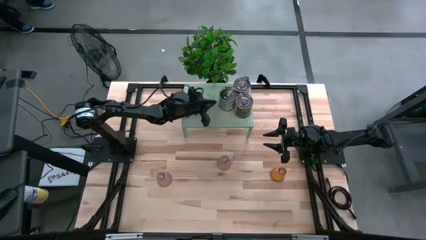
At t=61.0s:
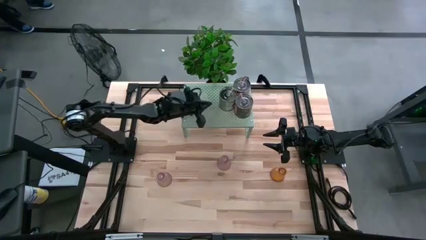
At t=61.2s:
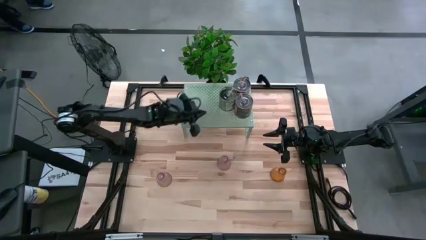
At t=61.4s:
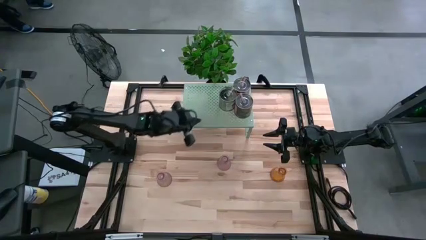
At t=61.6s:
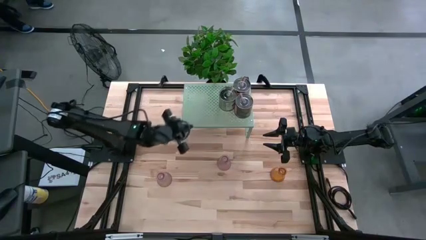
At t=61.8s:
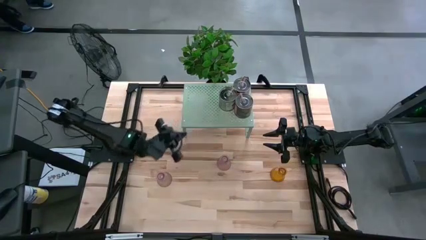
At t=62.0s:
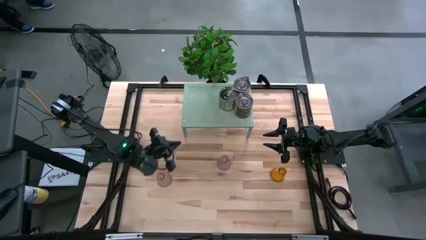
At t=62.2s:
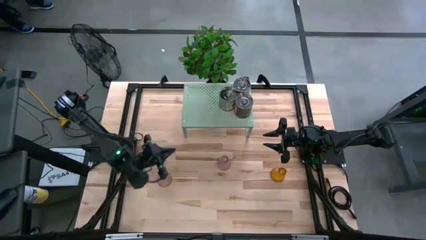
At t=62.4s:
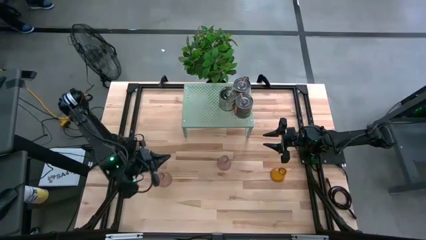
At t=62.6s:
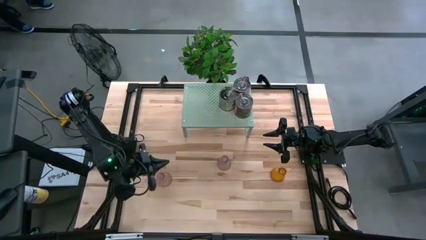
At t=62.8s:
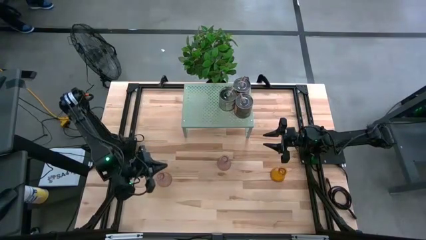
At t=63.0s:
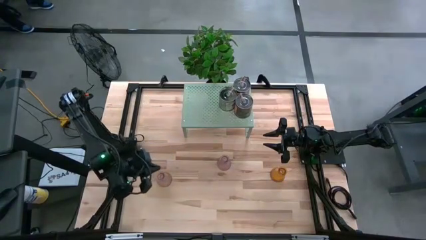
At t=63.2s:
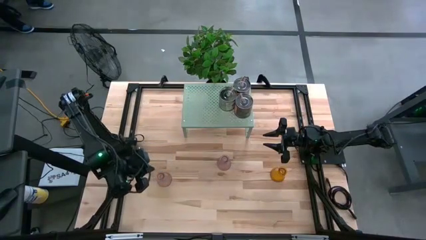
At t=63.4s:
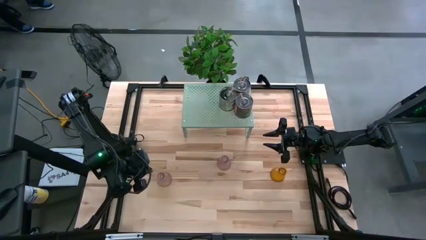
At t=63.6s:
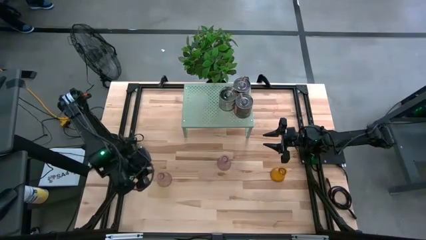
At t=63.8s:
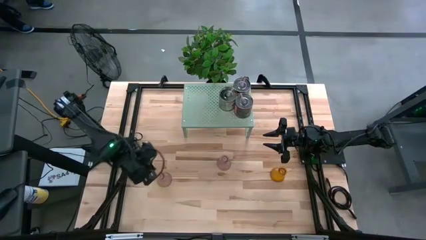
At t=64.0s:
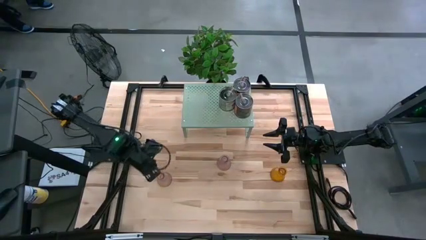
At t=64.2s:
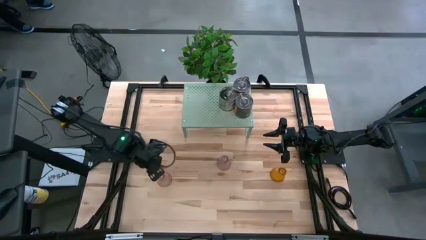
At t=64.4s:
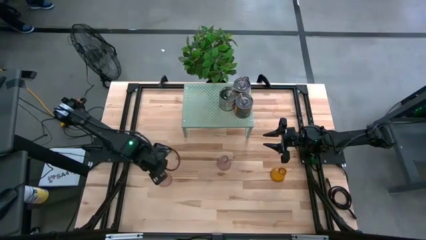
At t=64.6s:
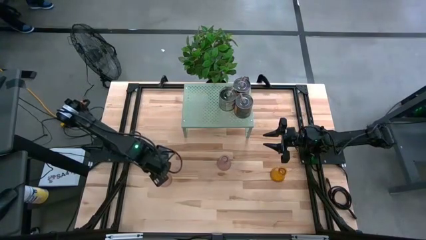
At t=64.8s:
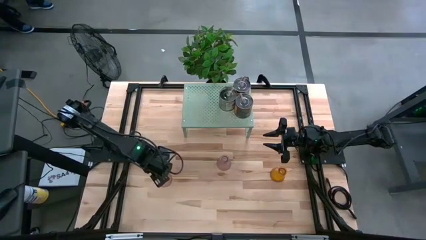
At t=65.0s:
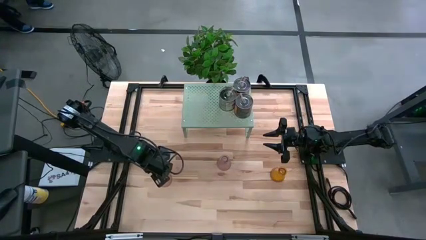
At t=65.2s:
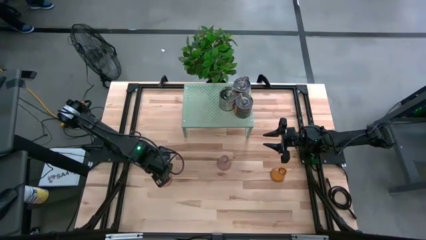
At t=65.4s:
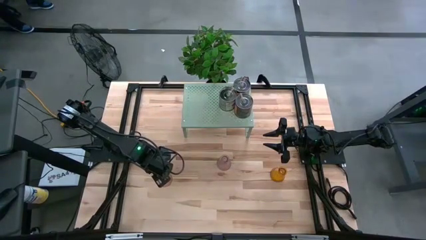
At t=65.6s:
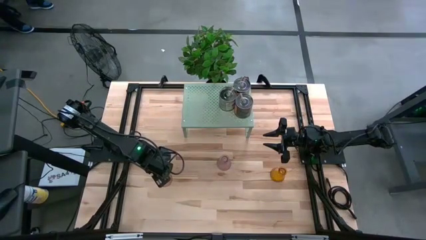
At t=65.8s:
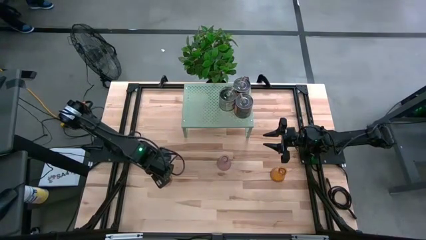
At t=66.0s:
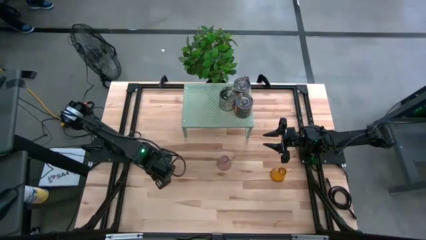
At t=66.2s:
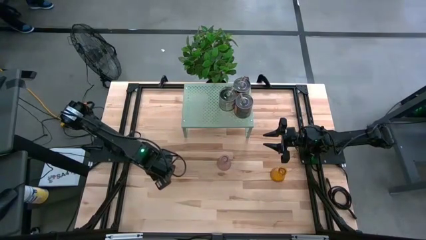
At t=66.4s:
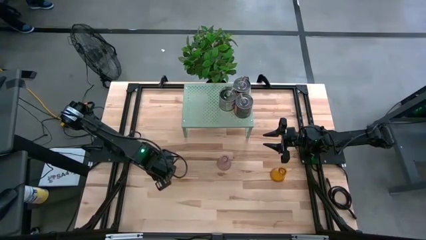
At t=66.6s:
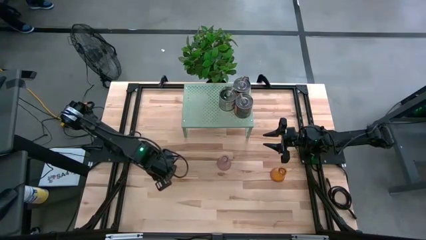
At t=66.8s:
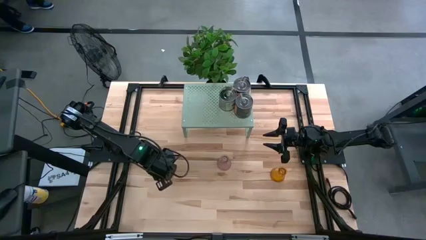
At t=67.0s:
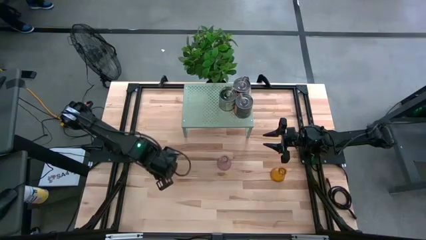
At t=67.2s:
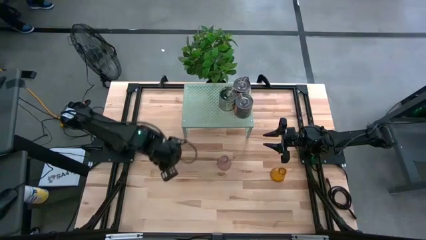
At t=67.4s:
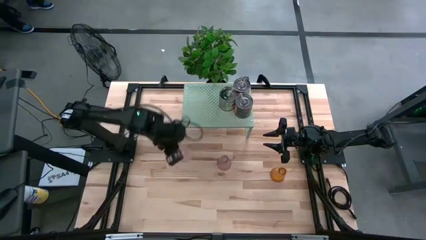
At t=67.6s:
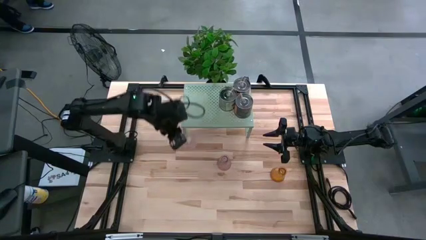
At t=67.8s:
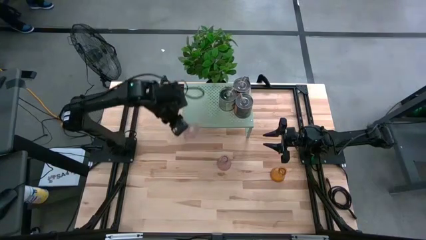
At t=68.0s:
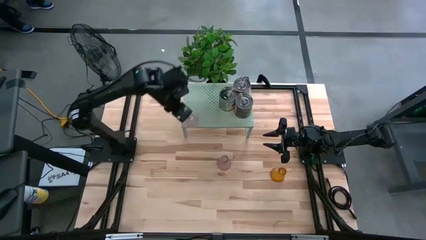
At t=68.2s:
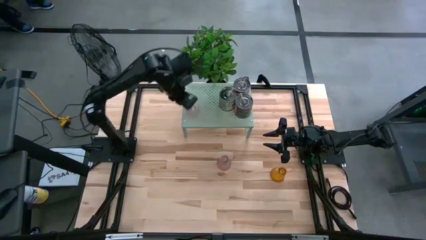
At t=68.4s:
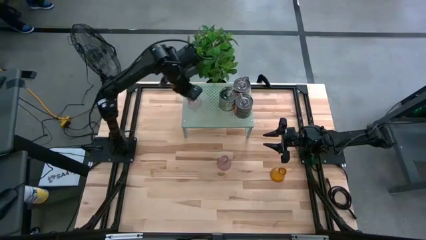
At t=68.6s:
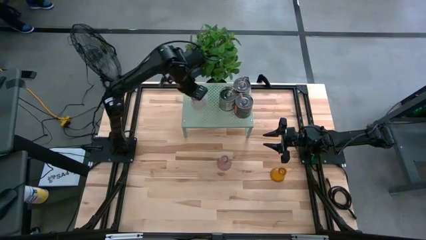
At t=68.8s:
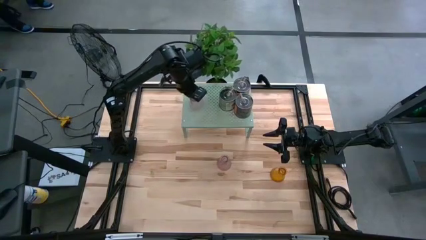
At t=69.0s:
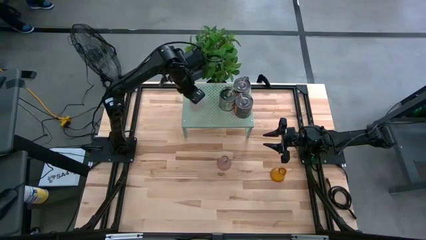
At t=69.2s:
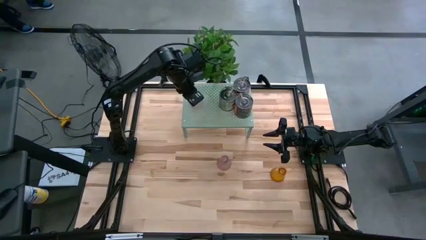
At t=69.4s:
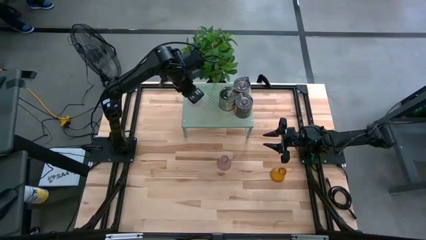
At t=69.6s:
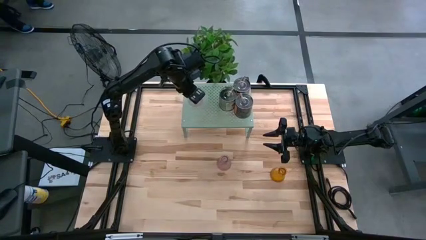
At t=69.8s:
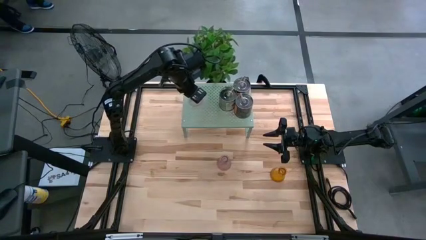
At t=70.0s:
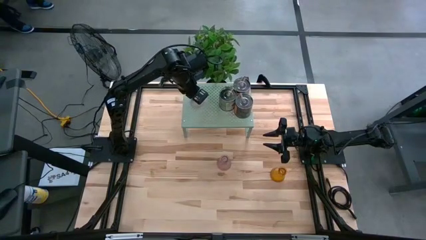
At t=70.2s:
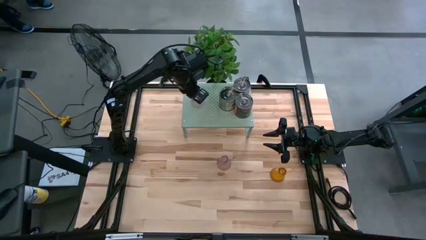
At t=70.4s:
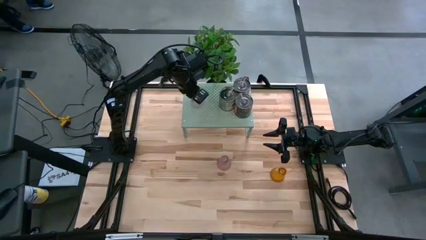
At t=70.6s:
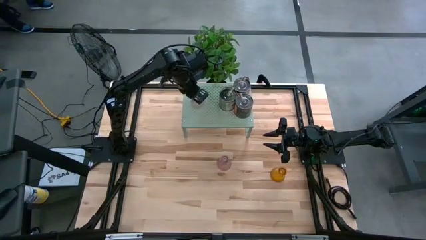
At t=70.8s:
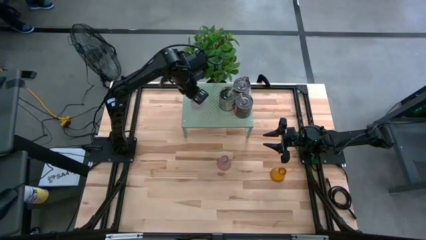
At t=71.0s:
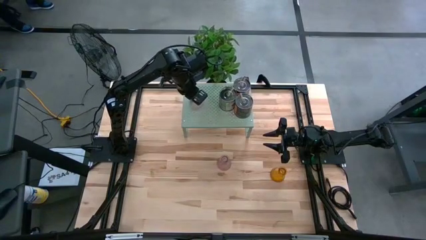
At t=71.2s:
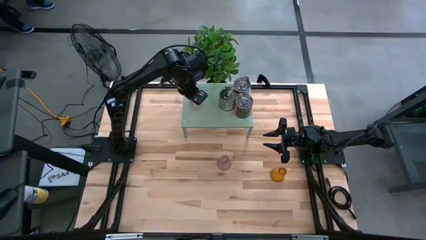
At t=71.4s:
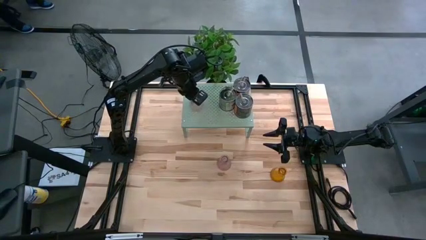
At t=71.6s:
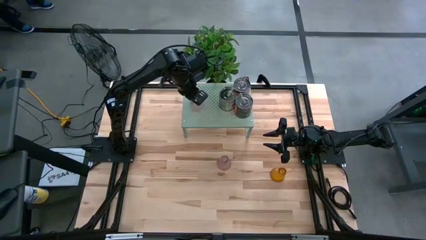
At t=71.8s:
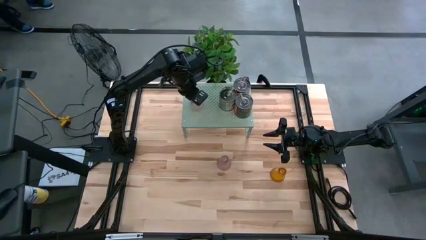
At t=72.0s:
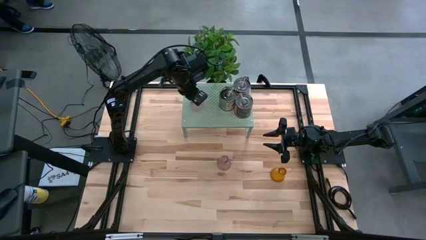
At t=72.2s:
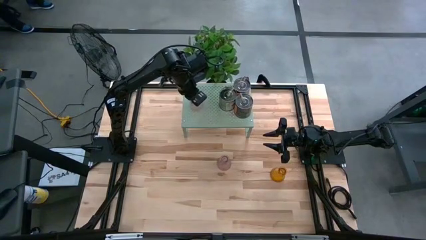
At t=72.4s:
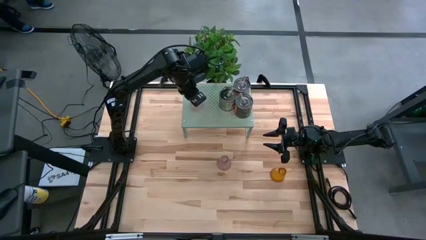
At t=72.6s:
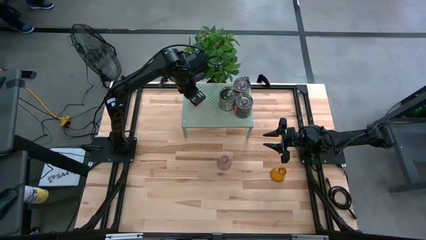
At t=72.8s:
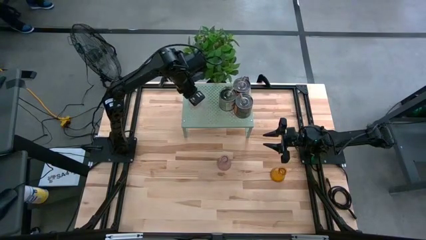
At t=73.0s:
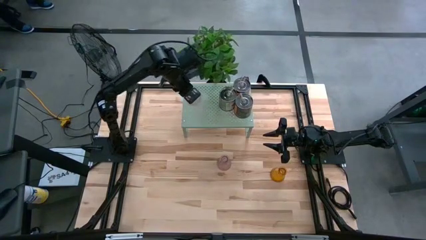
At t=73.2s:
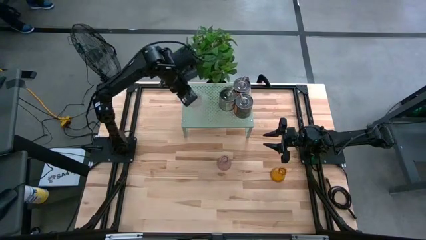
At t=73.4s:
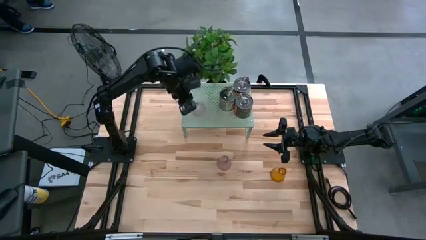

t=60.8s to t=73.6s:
Task: Pick & Place candle stick holders
Put the left pink glass candle holder on the shelf

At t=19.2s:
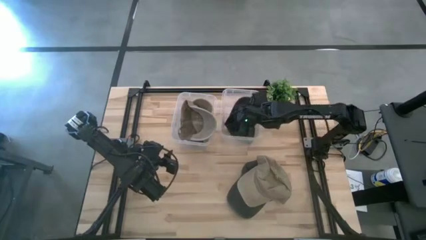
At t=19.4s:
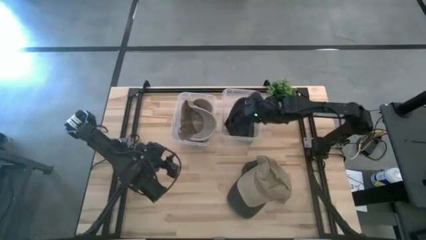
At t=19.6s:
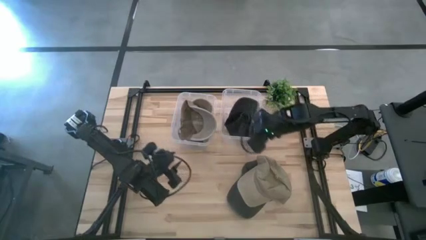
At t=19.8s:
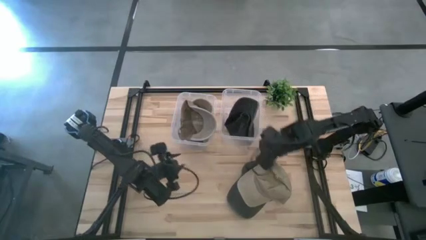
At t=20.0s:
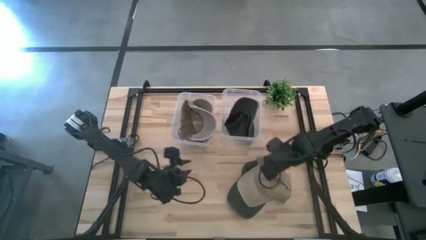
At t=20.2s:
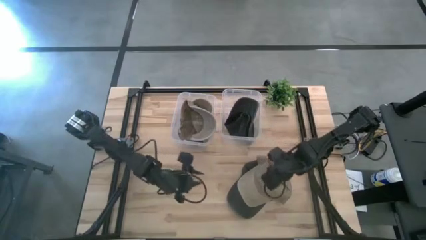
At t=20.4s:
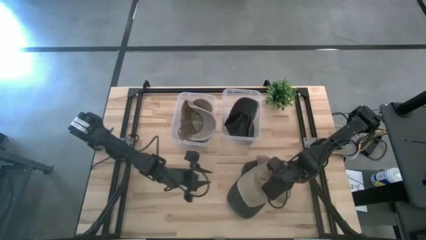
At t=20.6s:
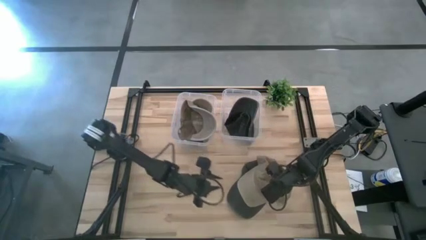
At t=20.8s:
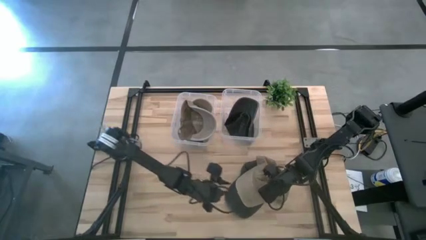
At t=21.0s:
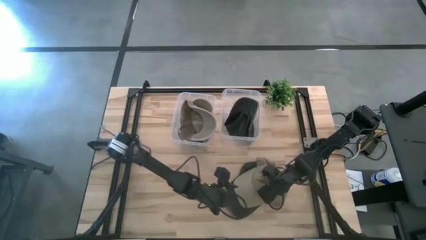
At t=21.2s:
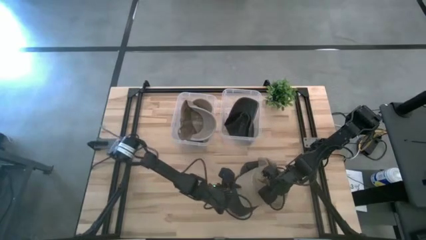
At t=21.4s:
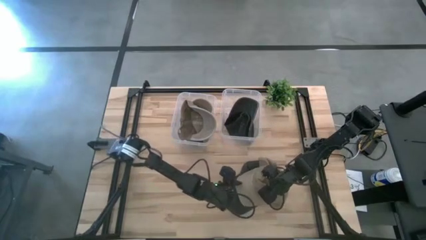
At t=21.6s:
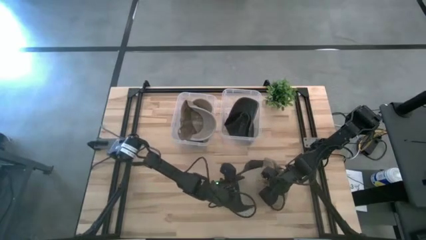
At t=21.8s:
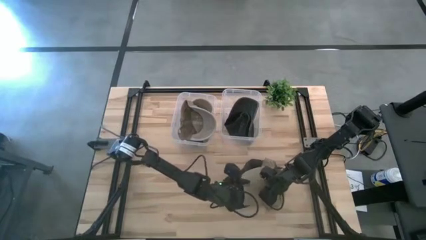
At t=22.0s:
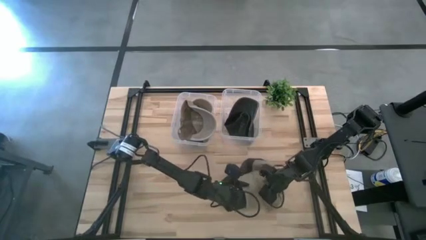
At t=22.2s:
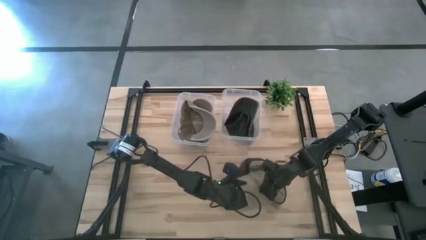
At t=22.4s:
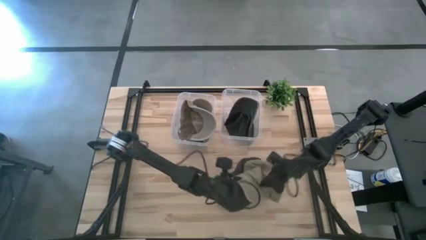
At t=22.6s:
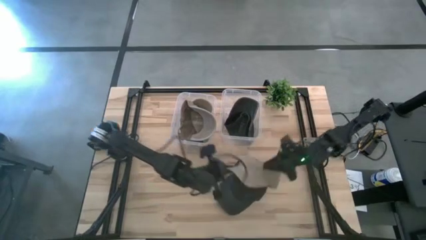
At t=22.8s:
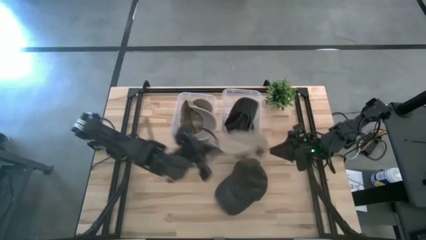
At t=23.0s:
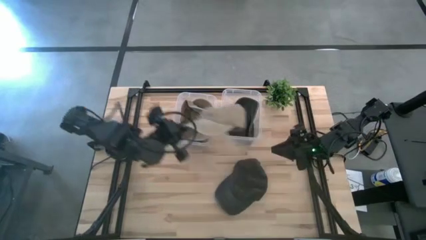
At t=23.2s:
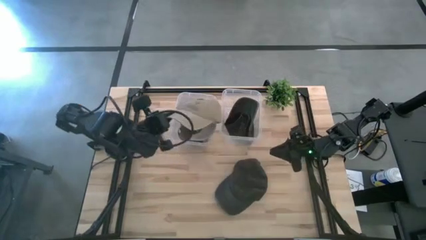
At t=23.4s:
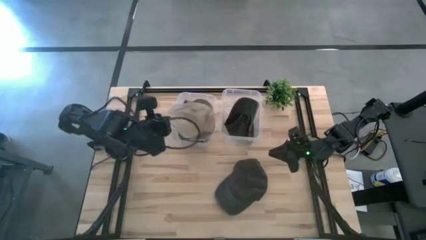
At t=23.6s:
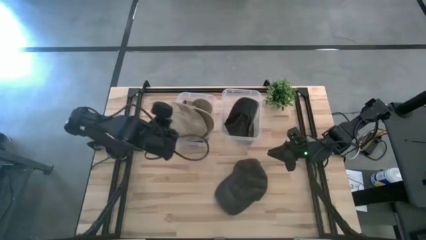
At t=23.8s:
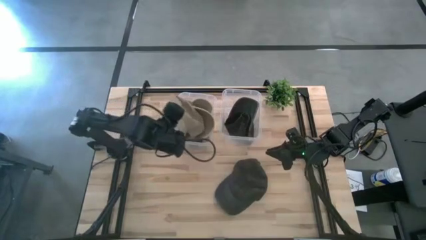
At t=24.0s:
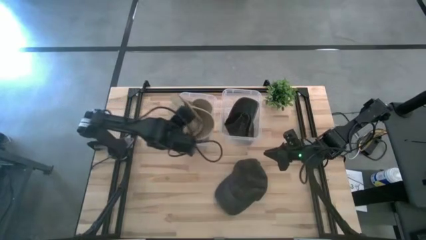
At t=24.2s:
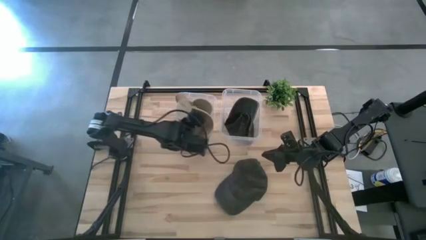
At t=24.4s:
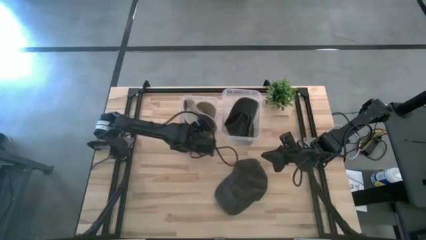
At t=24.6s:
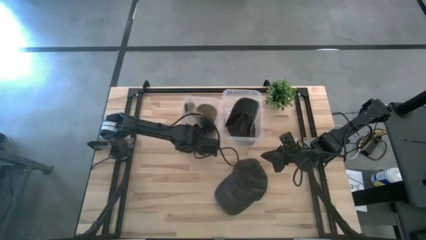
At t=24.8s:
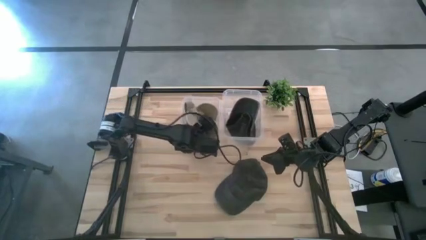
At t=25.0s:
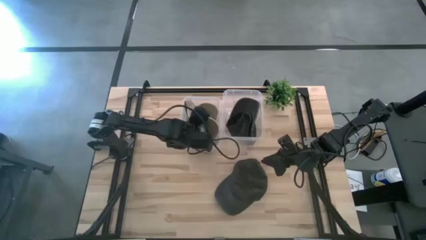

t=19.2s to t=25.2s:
Task: Pick & Place hat
Put the brown cap into the left transparent bin
